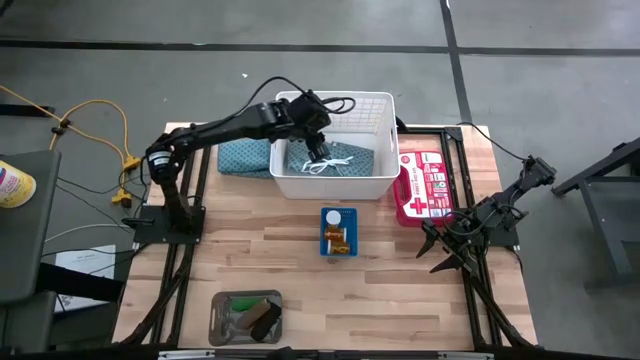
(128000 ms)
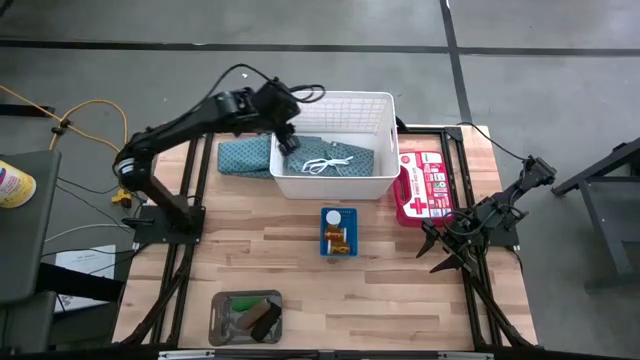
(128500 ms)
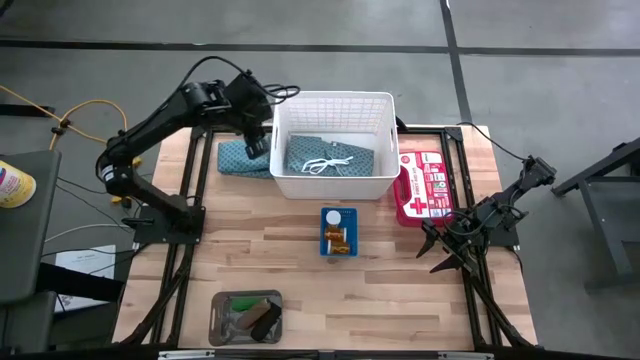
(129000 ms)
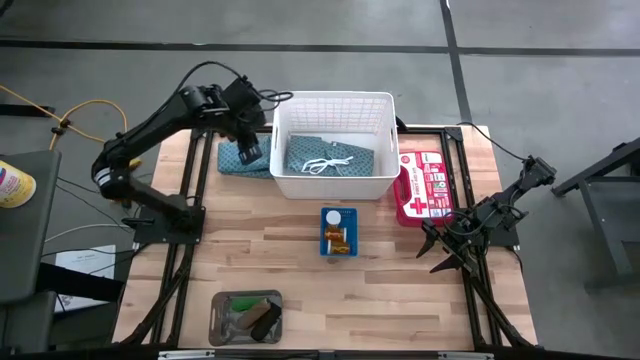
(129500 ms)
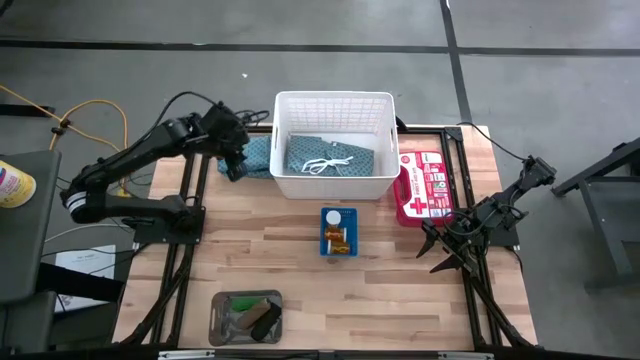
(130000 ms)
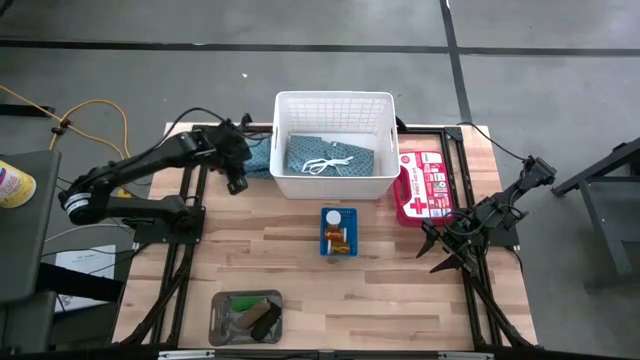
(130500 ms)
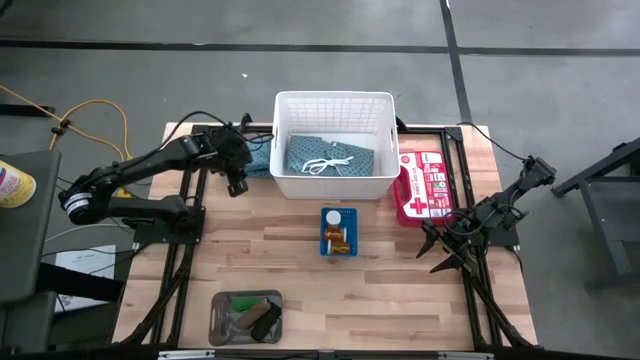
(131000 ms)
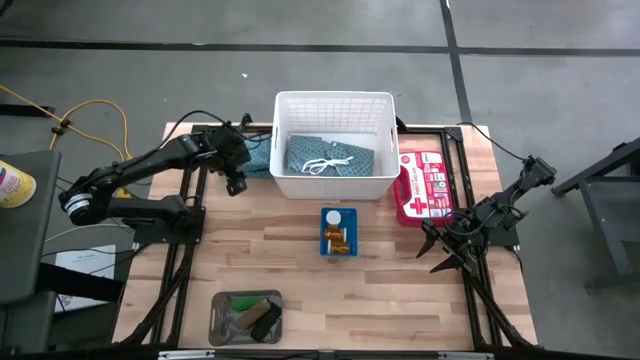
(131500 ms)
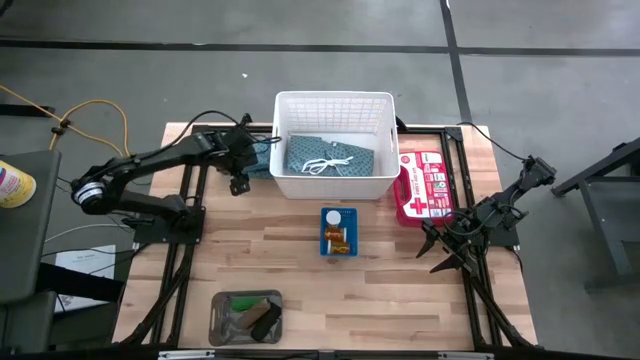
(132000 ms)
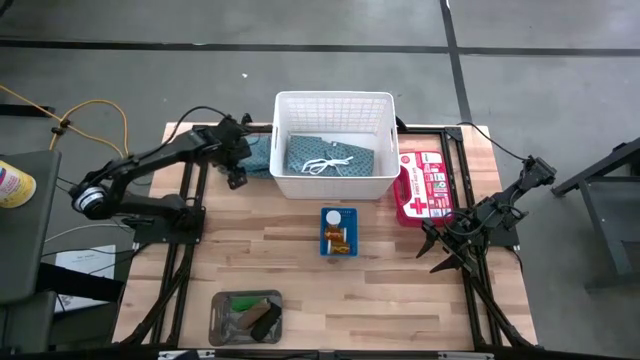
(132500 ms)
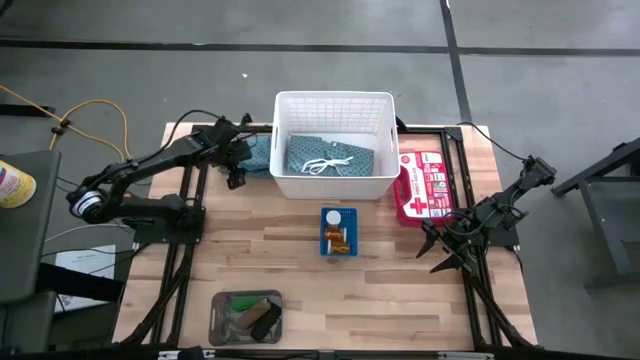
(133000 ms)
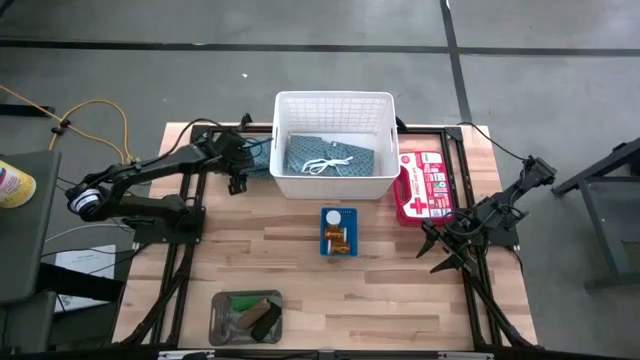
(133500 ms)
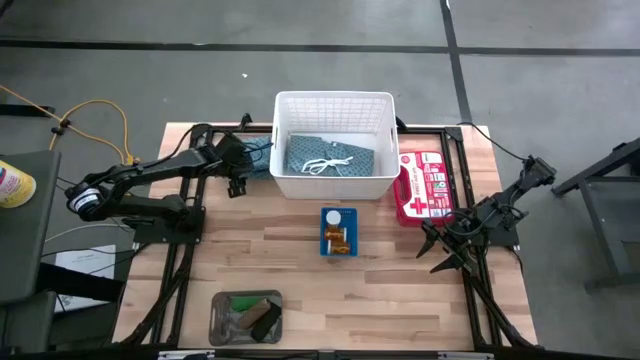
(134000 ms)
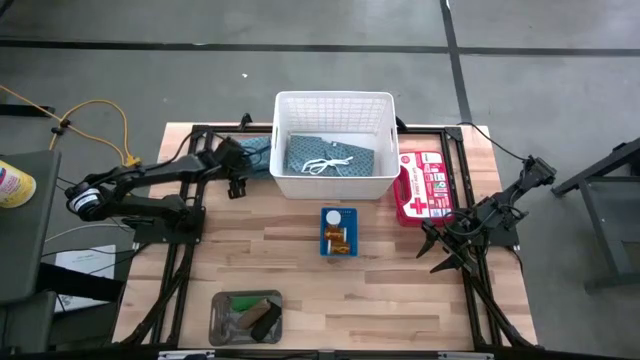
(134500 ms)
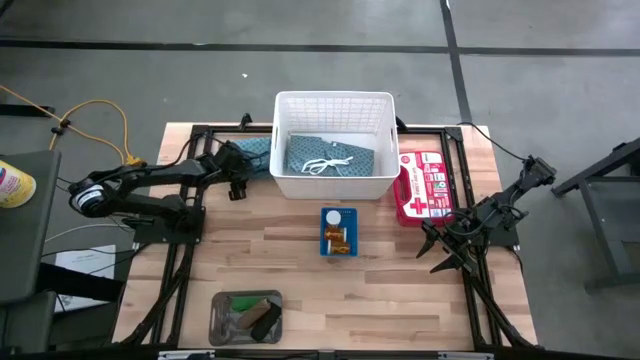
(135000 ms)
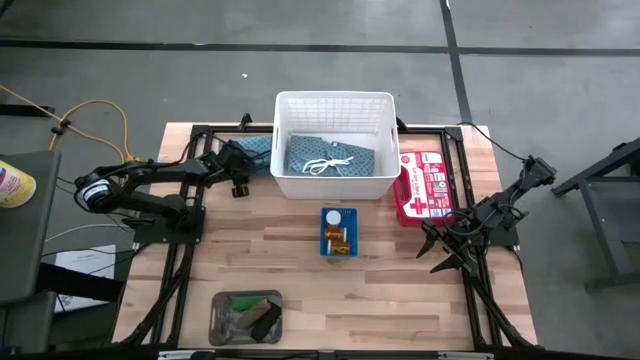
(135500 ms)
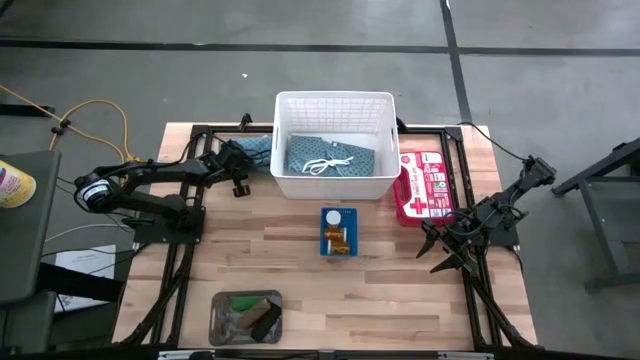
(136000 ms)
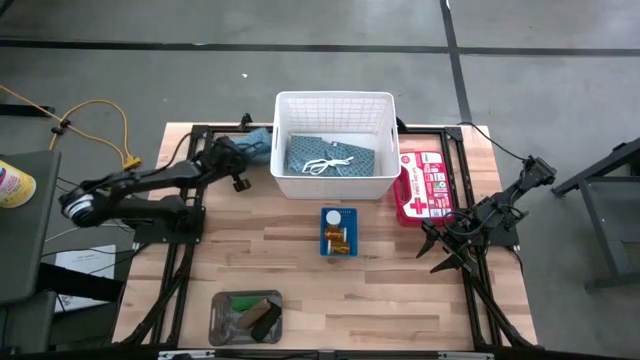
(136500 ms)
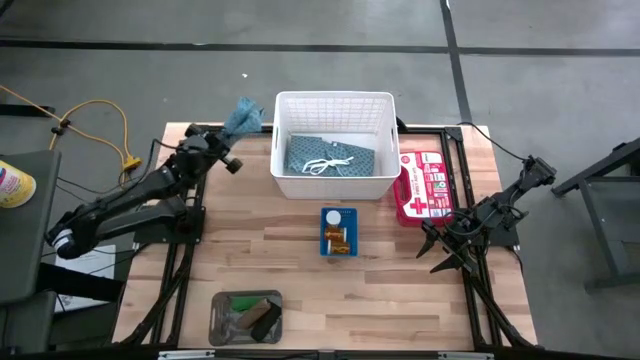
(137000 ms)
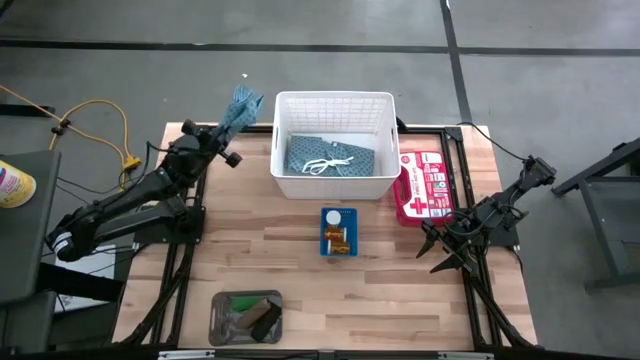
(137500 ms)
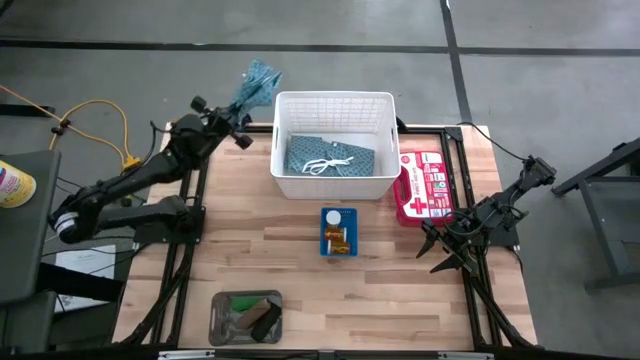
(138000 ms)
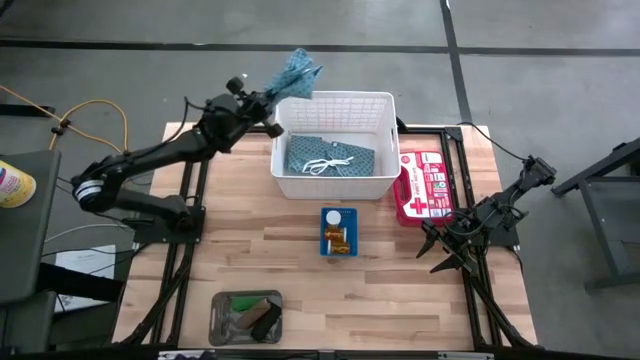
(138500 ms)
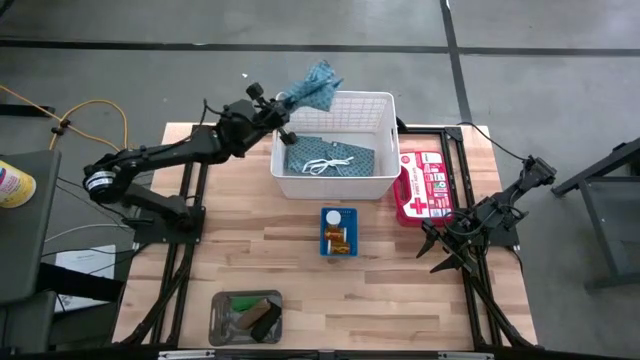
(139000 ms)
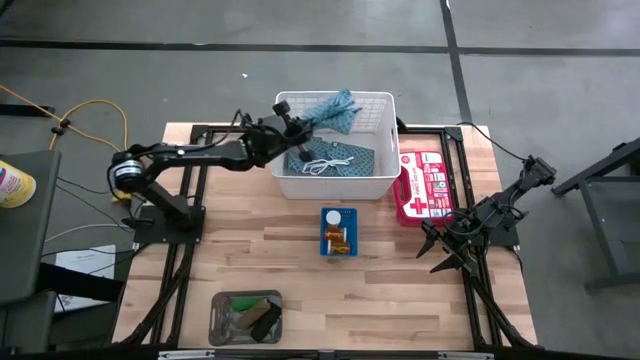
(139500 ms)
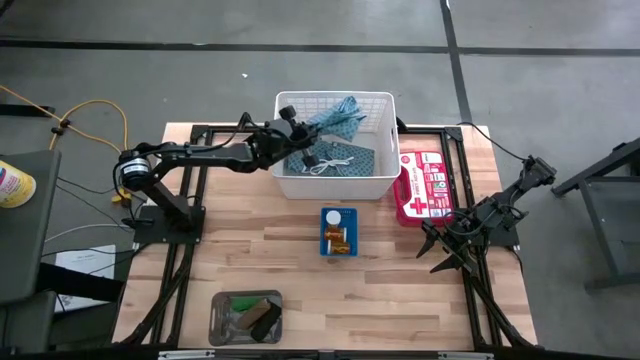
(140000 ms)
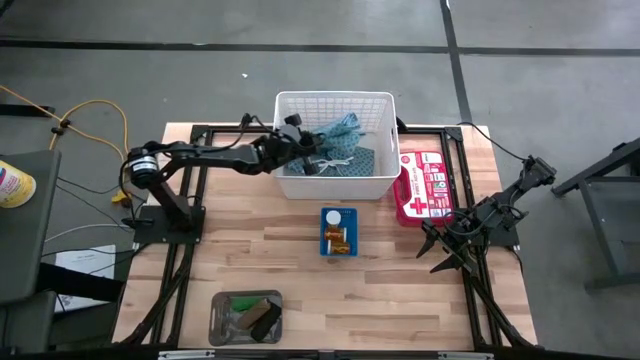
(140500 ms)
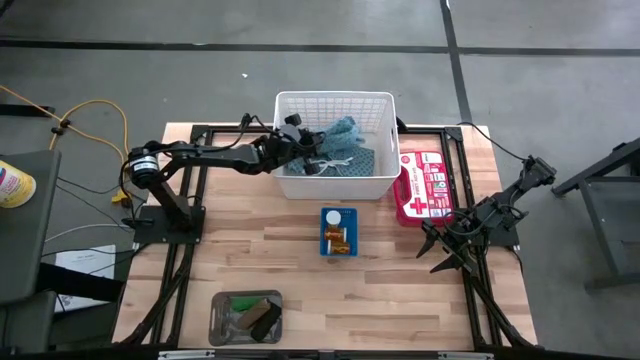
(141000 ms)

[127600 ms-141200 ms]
Task: Pick & place medical supplies in basket/bin
Put the blue patient gown into the laundry organizer

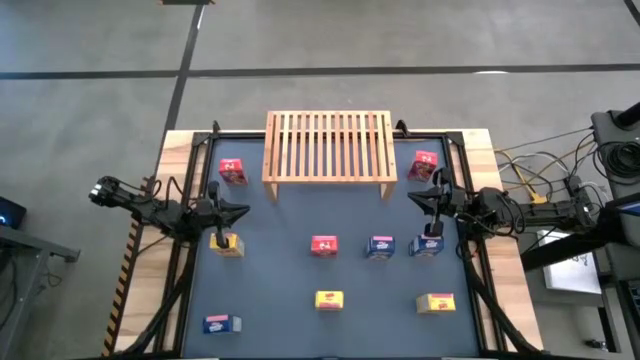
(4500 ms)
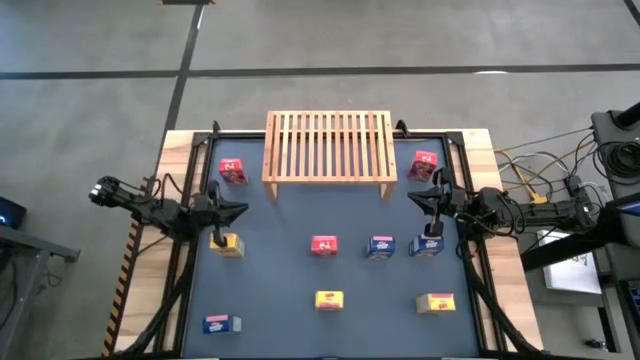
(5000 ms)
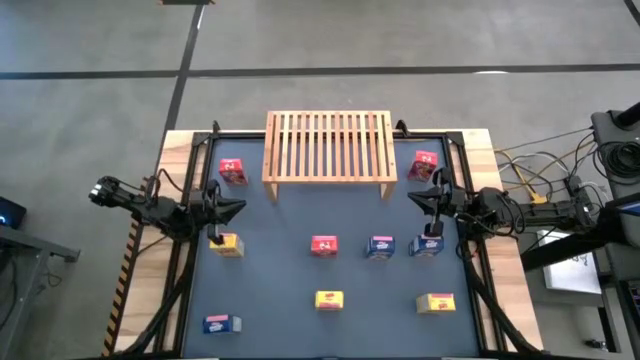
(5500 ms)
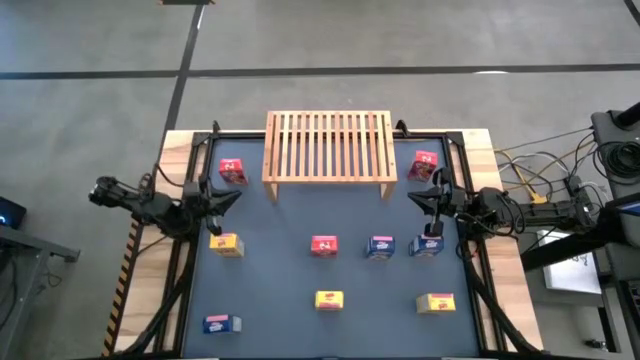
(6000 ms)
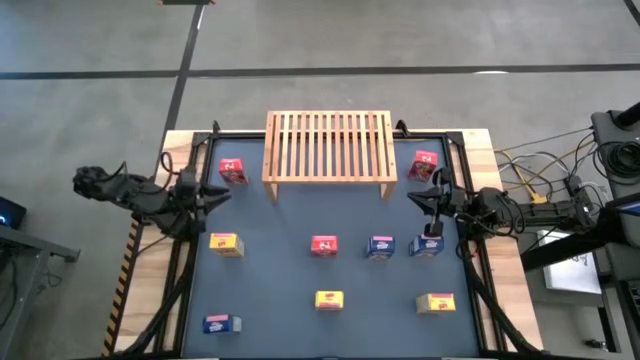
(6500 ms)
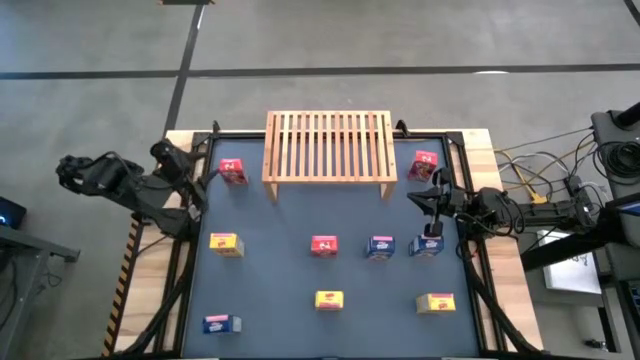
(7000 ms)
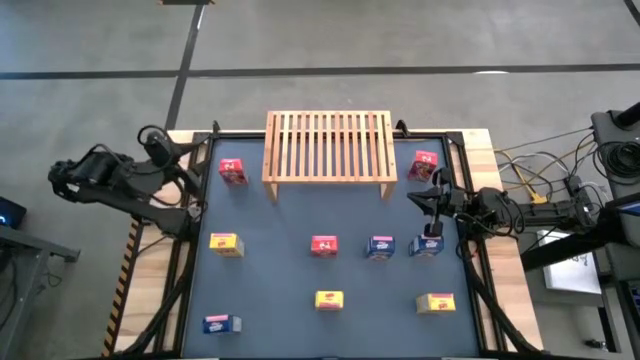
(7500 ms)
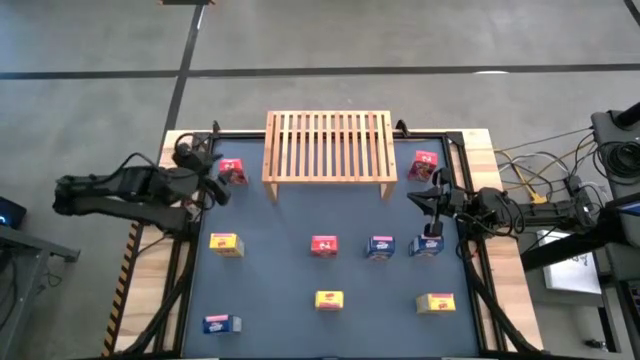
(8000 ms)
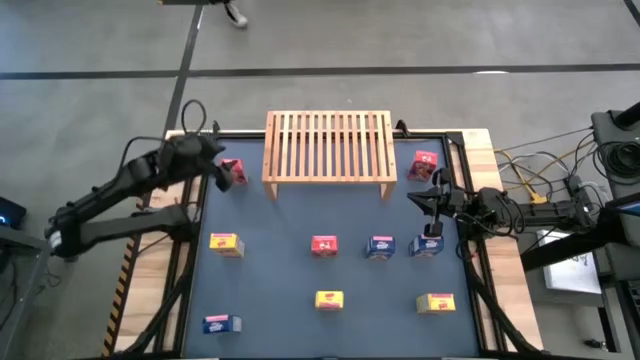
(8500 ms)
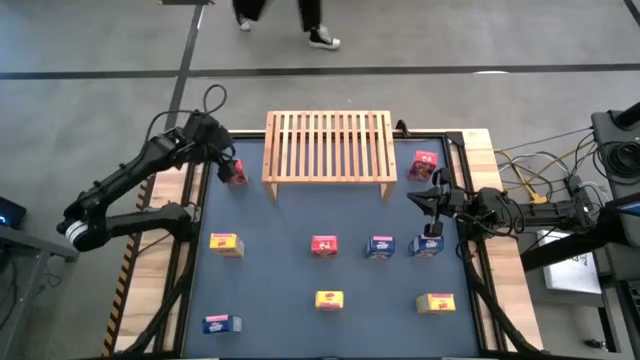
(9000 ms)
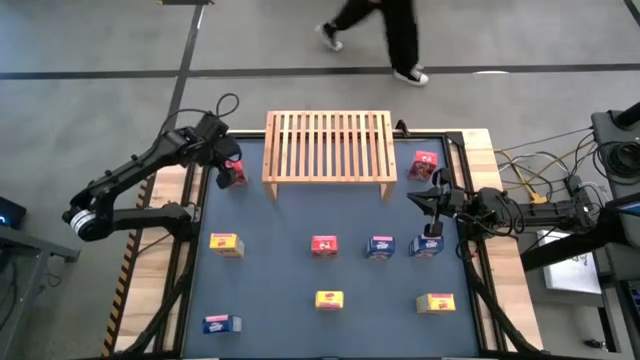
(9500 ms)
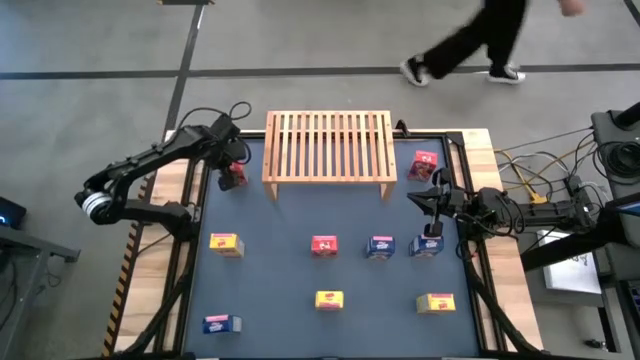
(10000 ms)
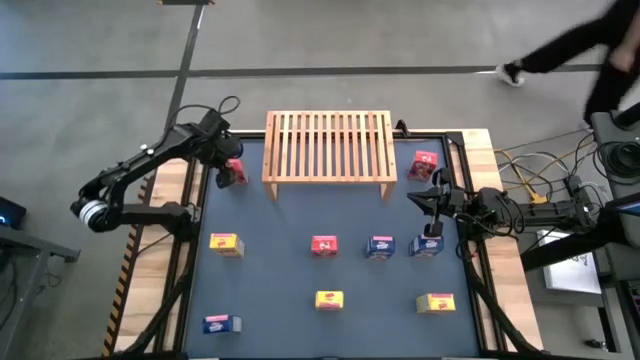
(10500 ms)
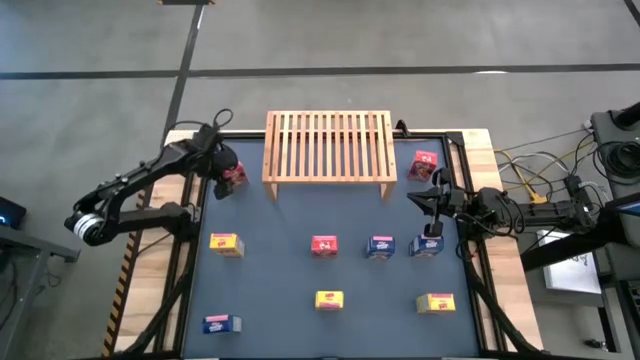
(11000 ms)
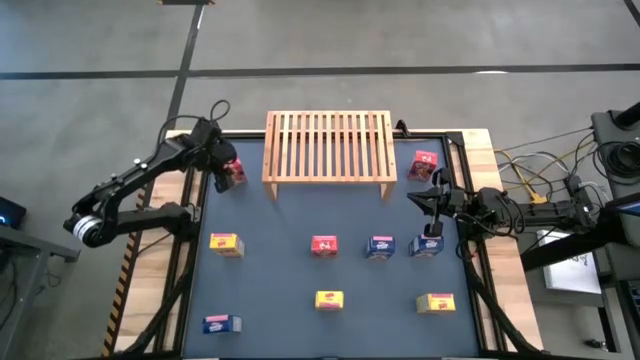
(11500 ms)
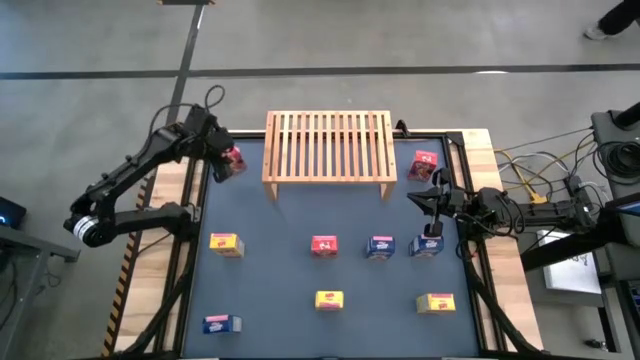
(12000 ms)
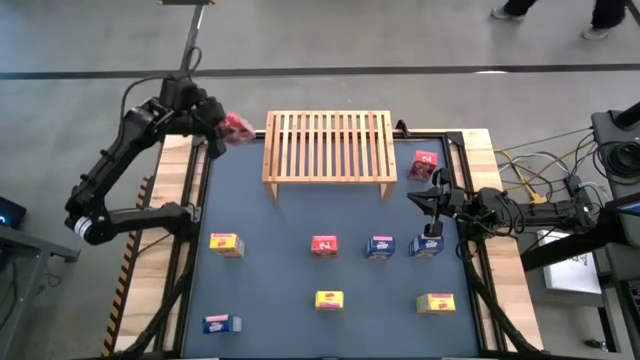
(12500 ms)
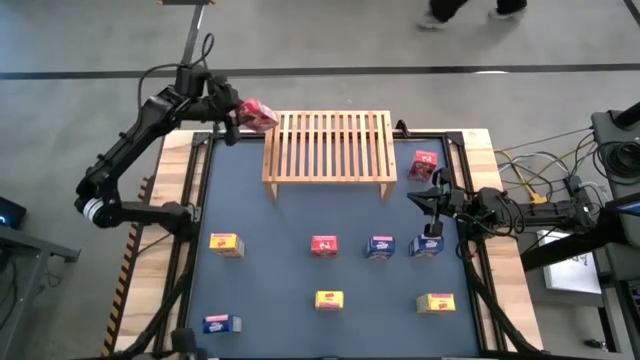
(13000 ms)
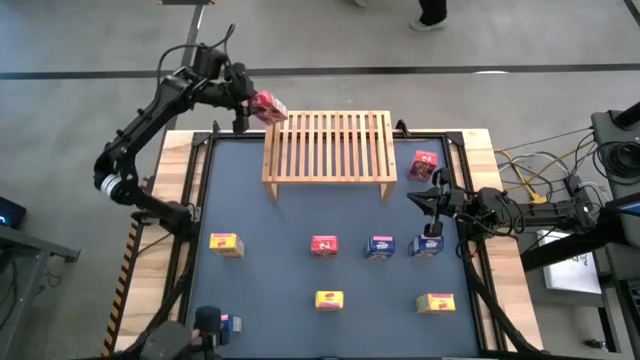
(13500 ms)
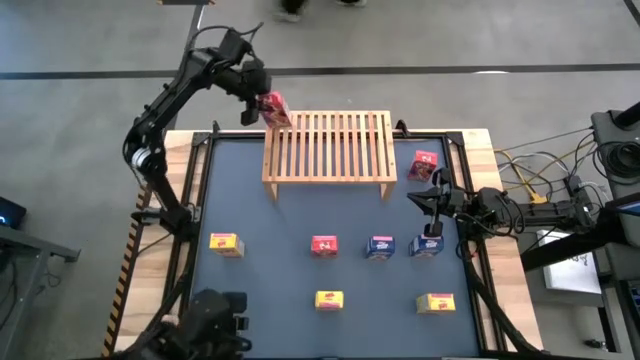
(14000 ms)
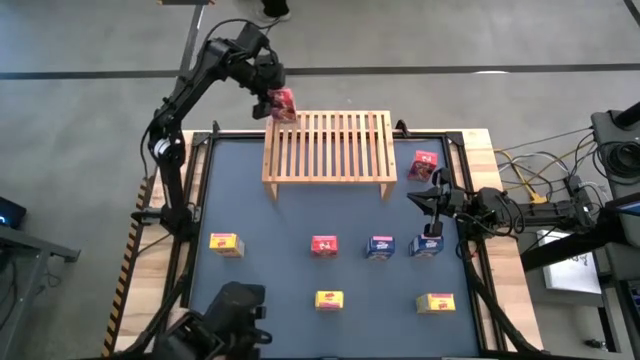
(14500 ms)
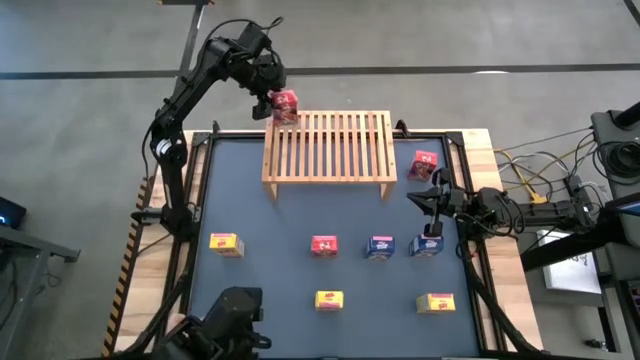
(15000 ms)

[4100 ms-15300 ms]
Task: Stack cereal on shelf
Put the top left red cereal box on the shelf
